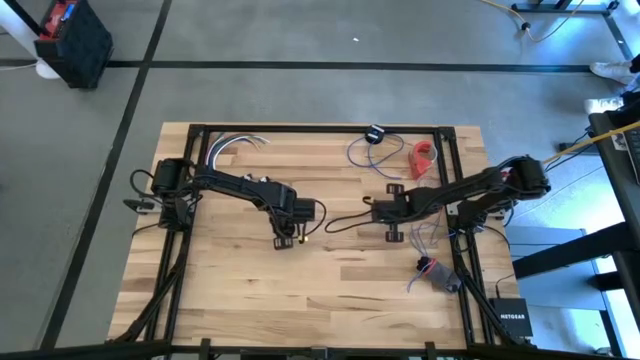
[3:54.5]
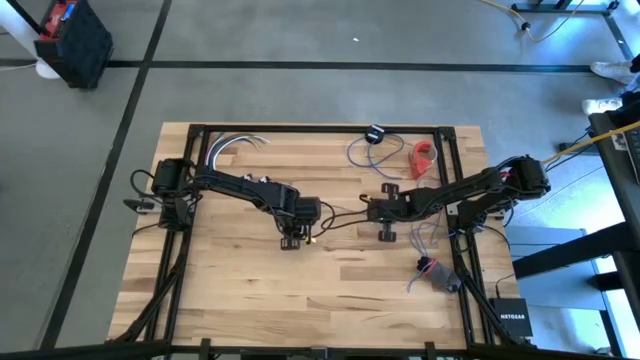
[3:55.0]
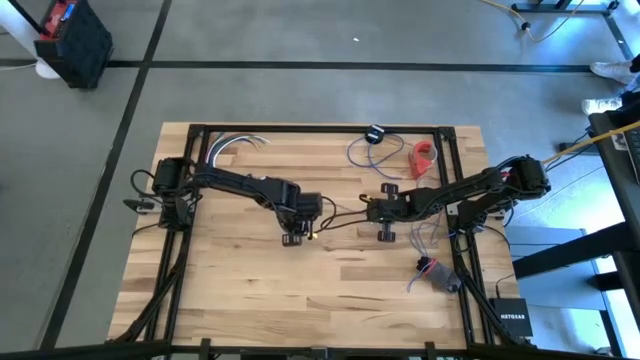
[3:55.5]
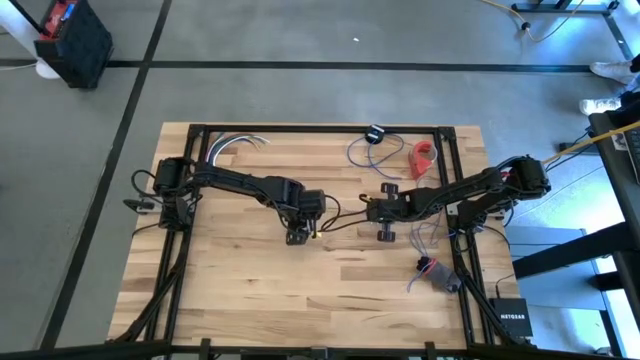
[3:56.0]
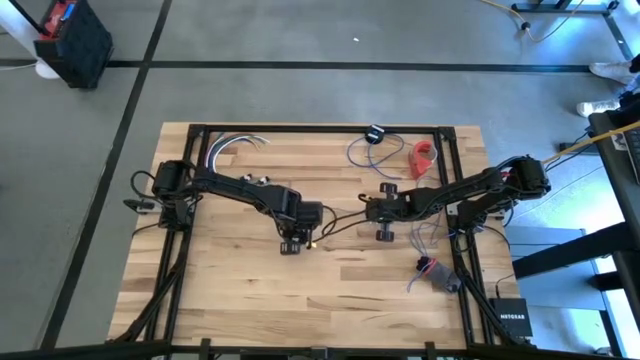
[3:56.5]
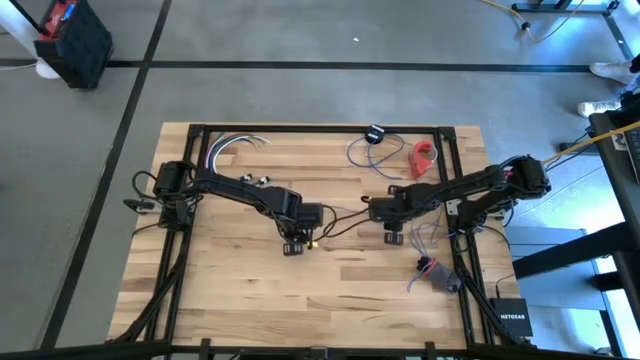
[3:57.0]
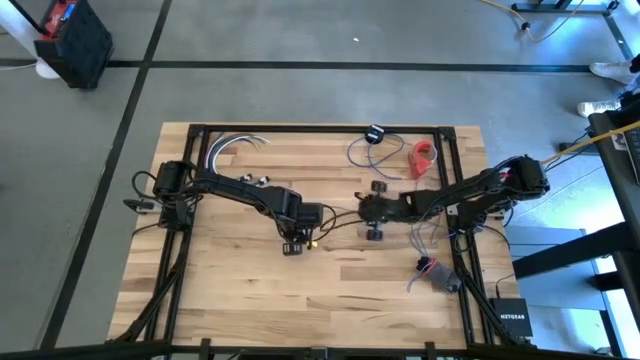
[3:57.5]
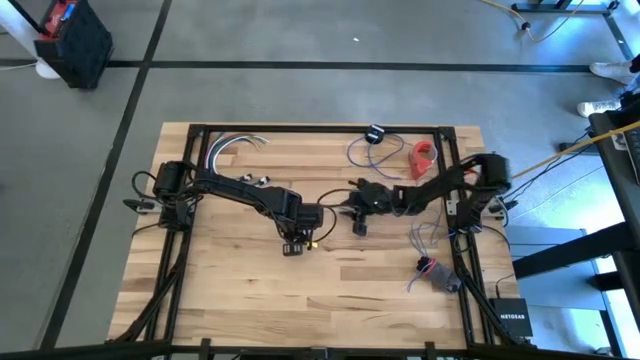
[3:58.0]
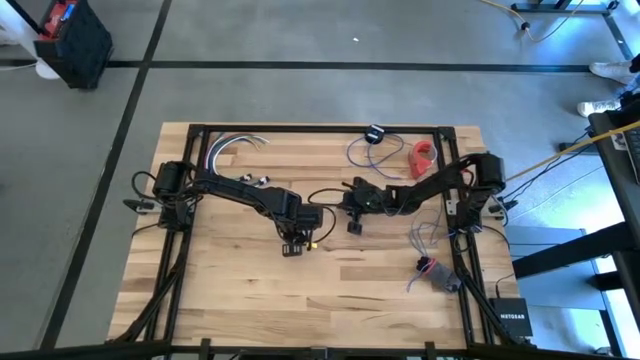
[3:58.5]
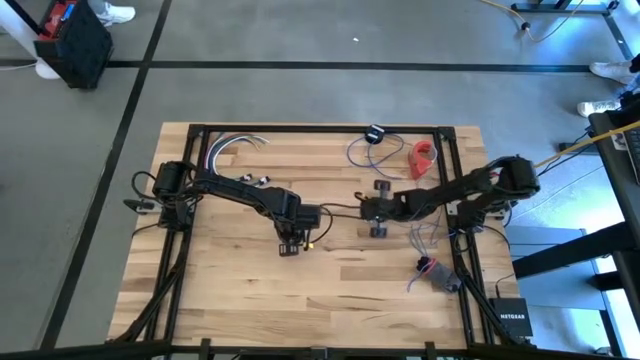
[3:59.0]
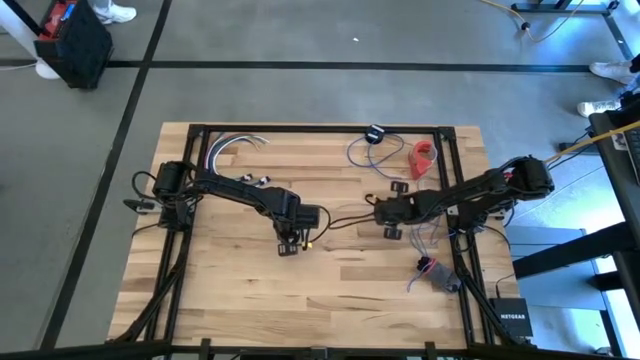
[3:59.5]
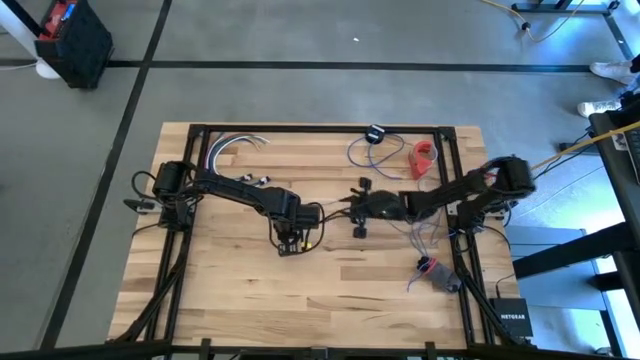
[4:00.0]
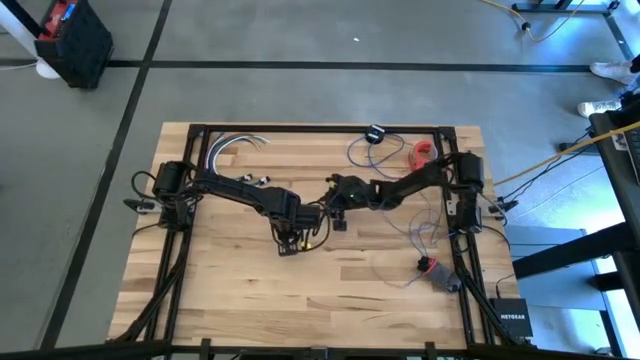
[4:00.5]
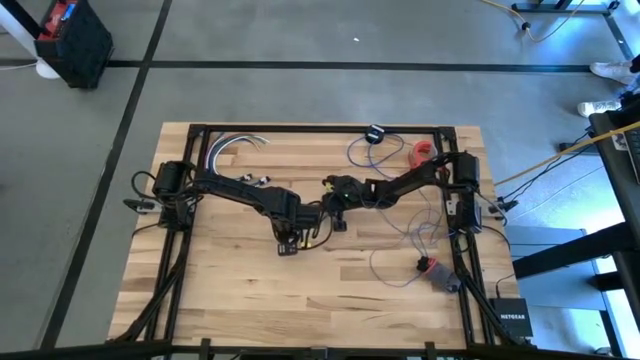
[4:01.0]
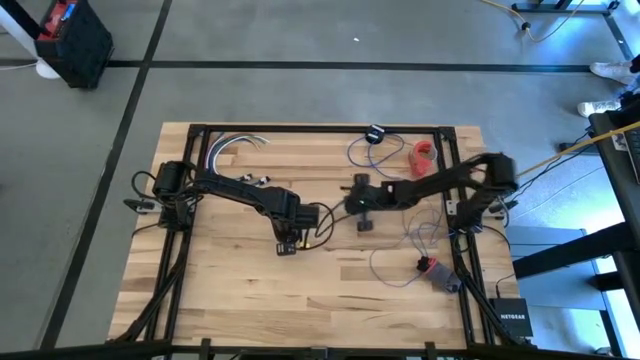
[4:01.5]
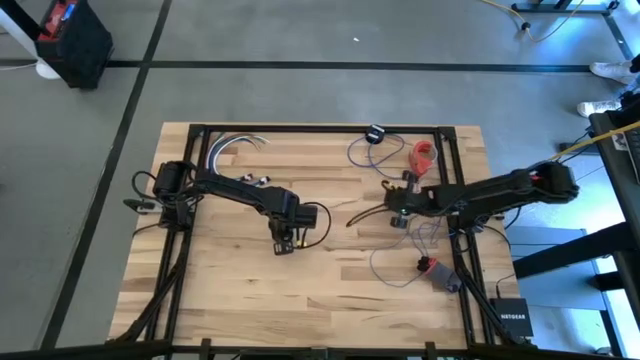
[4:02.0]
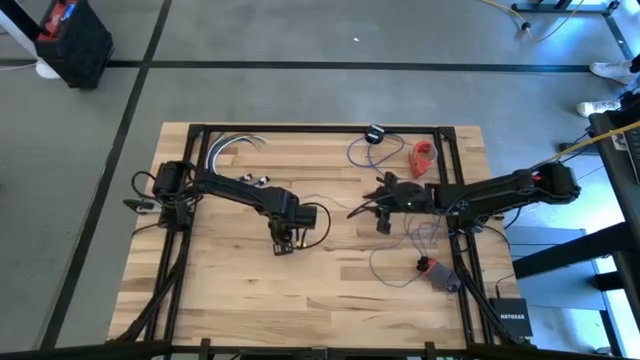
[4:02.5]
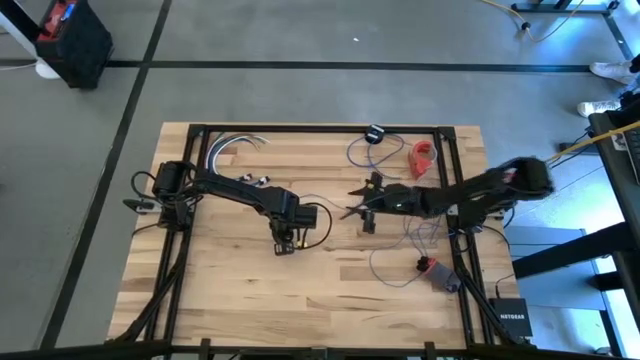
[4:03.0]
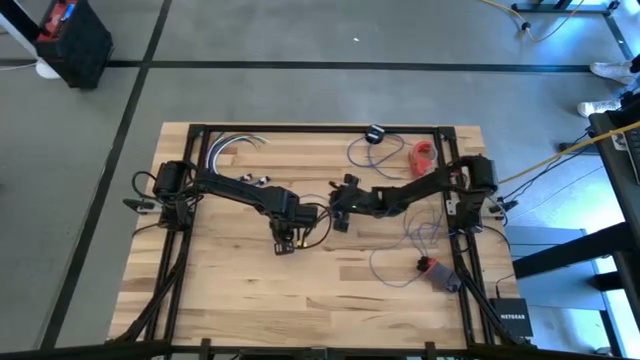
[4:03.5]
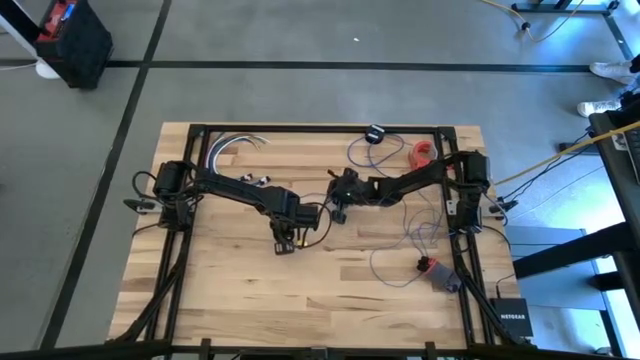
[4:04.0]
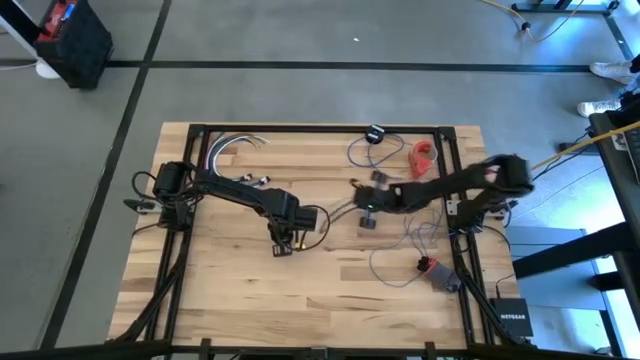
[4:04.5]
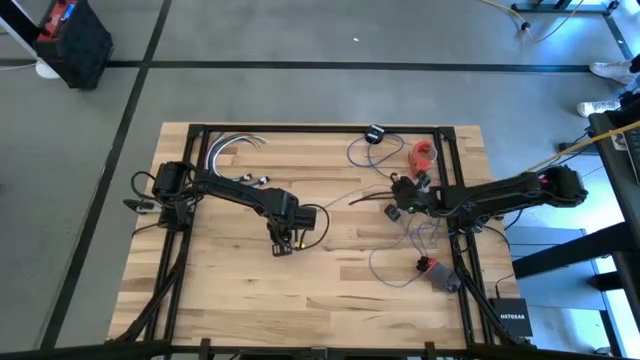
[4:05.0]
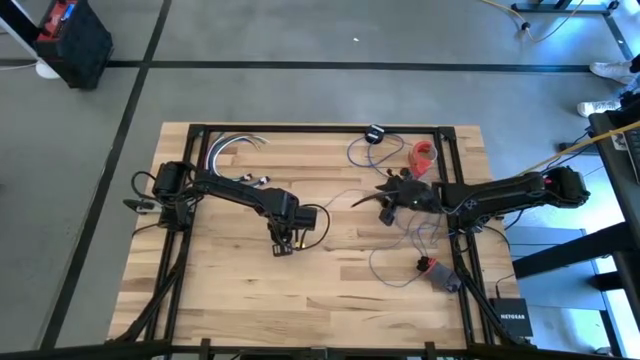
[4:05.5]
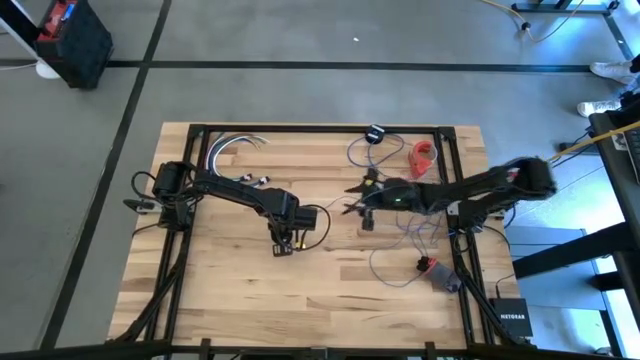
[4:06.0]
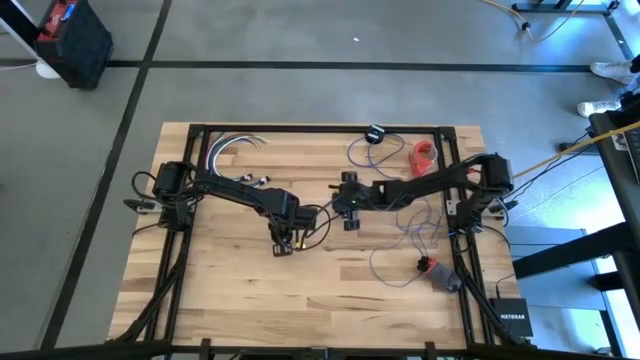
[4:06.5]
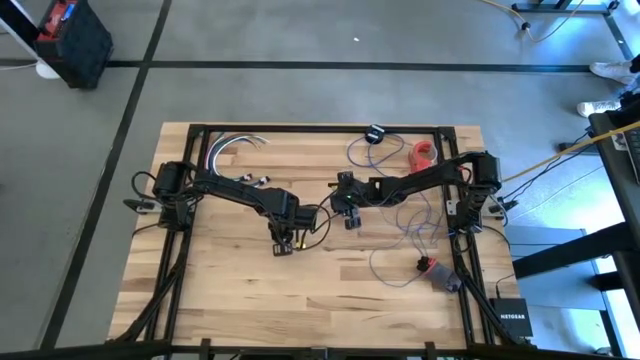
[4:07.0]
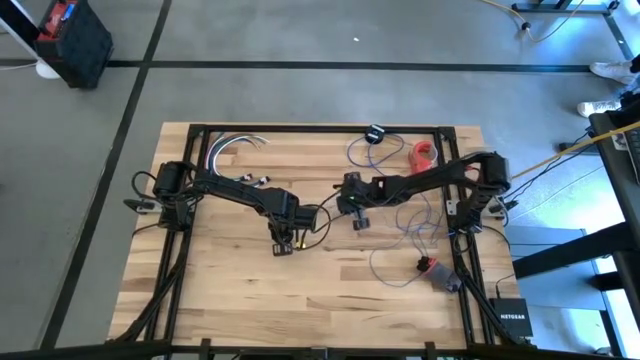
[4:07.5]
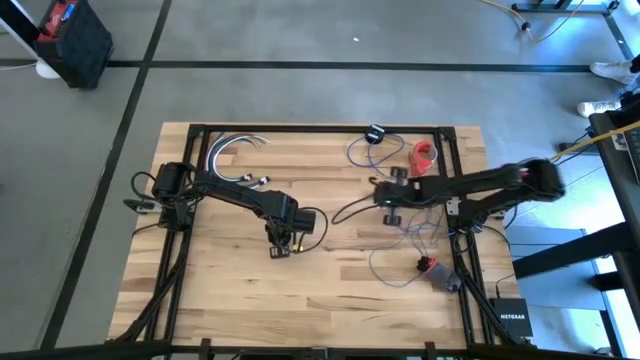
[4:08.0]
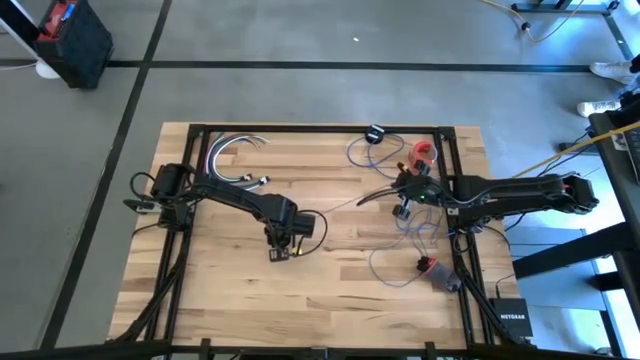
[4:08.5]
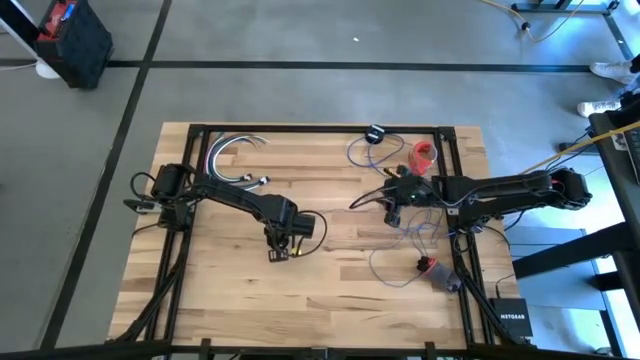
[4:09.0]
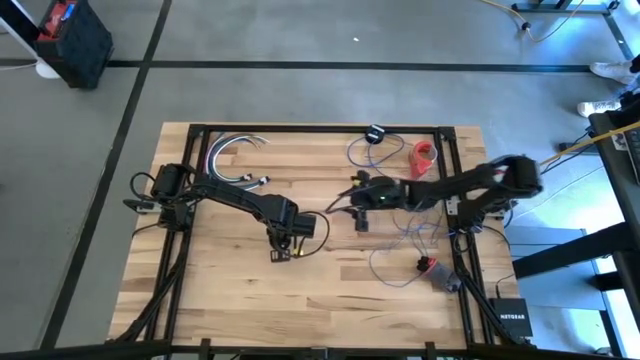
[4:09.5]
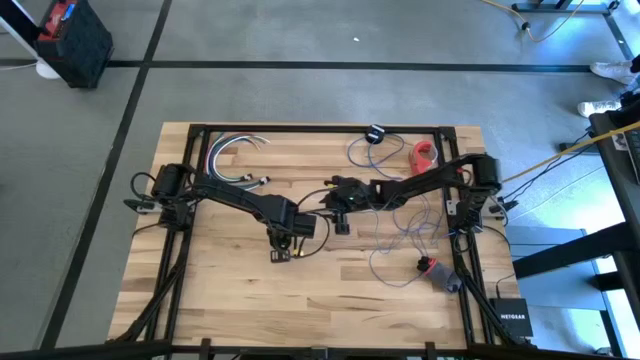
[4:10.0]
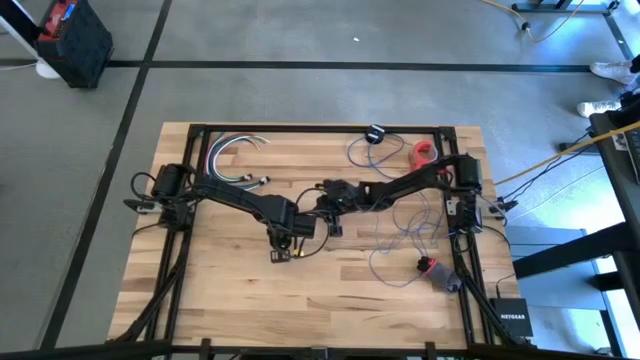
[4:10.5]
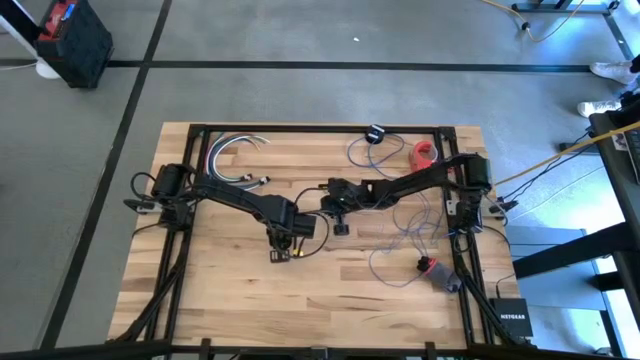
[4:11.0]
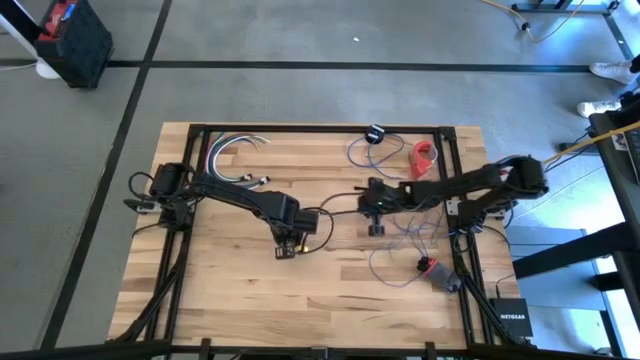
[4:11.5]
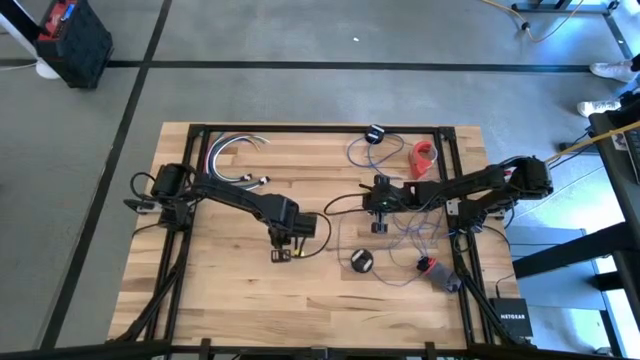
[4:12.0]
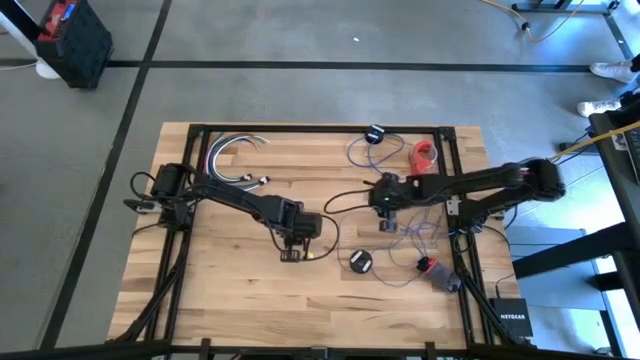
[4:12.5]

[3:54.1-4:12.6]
Task: Coil cords
Uncoil the blue wire from the spool

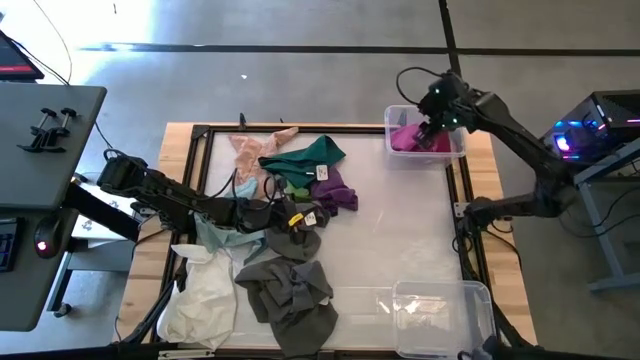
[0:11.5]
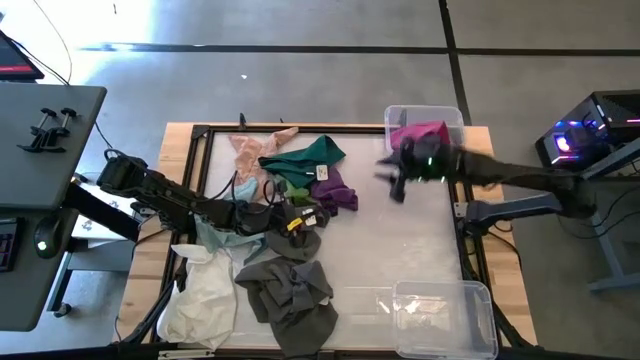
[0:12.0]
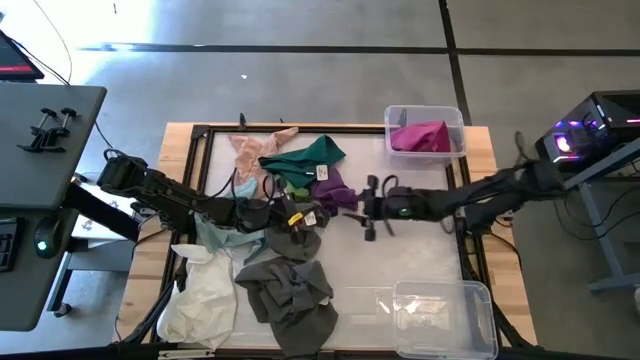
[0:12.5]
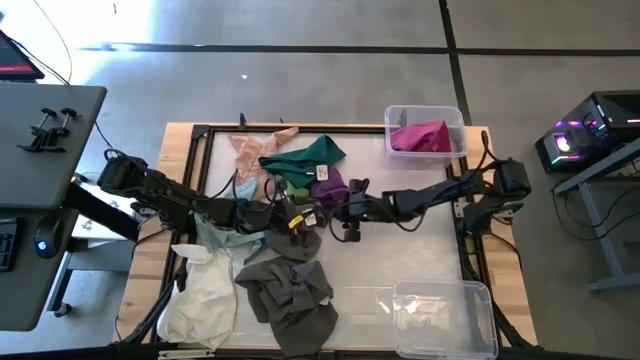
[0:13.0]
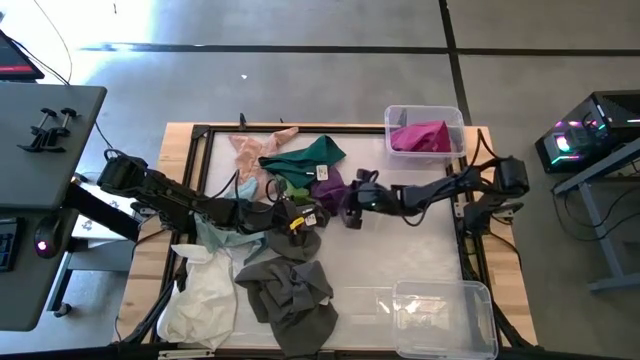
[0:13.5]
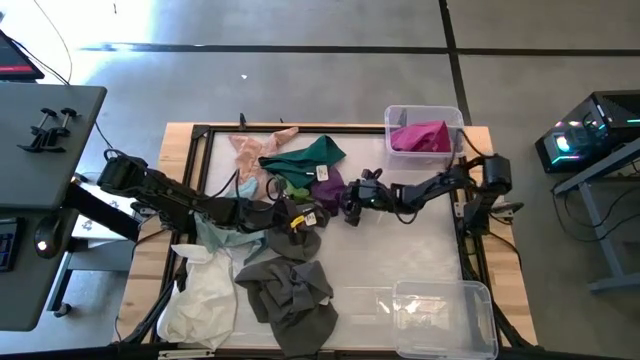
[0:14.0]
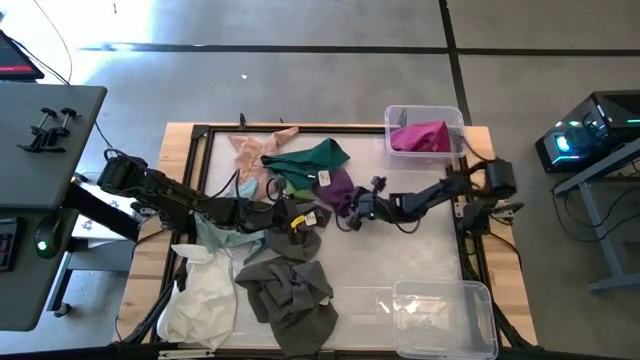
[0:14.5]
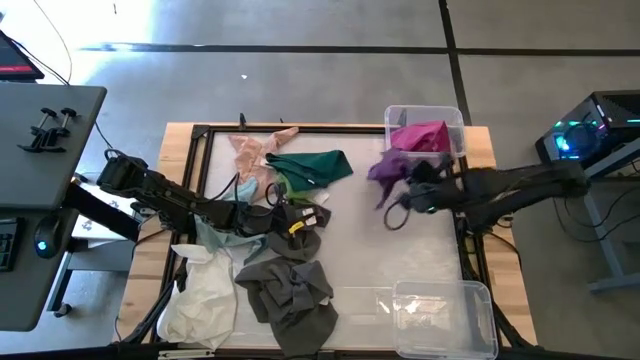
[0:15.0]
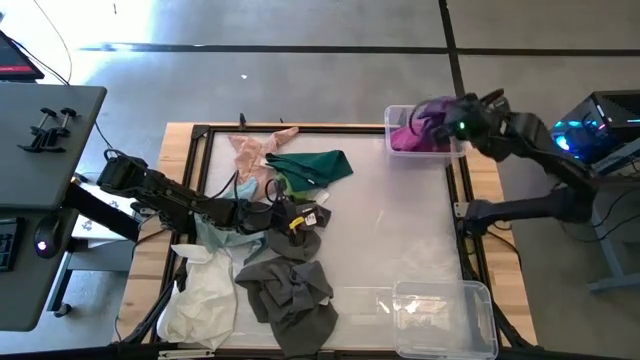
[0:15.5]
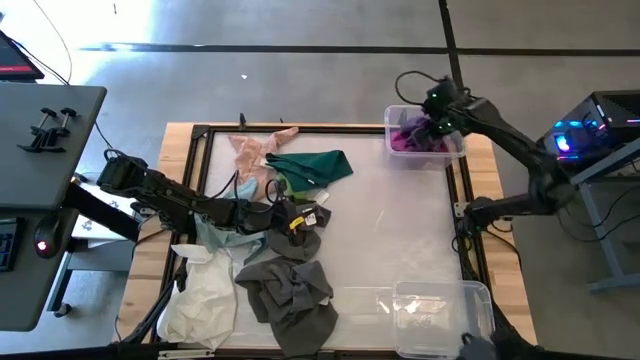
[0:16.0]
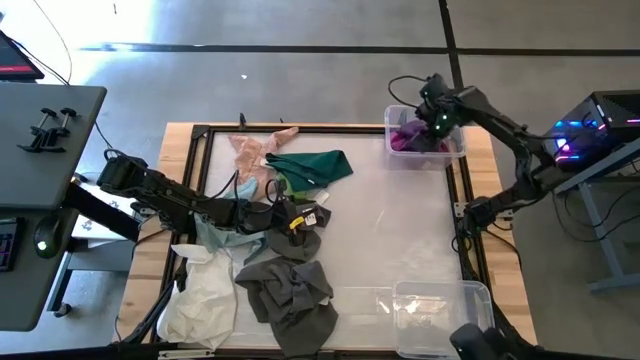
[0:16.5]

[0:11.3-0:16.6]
Task: Sort towels by color in basket
Put the violet towel into the top transparent bin
